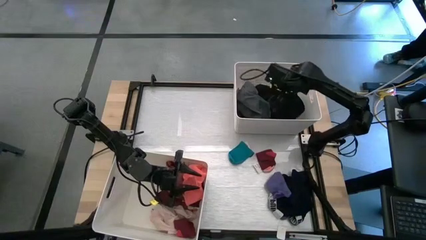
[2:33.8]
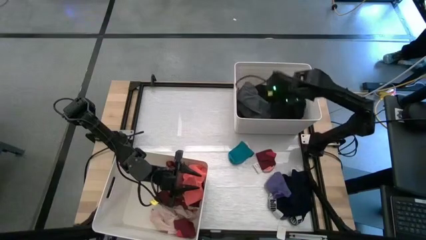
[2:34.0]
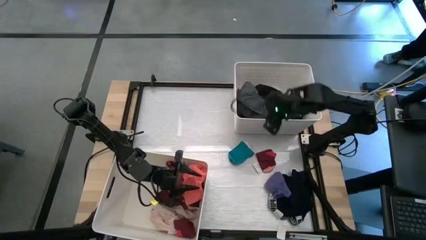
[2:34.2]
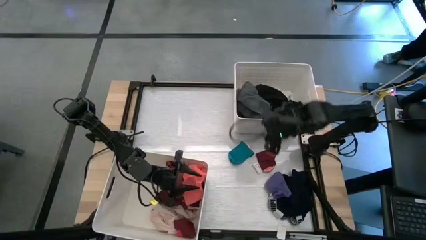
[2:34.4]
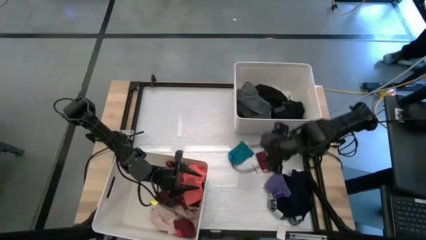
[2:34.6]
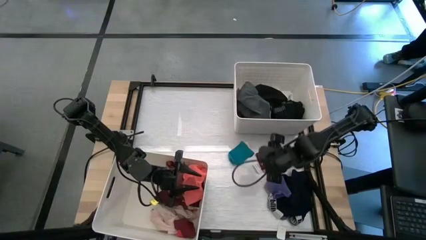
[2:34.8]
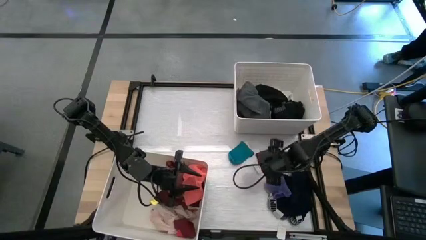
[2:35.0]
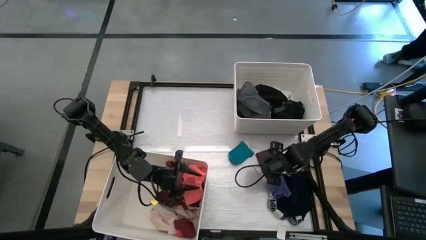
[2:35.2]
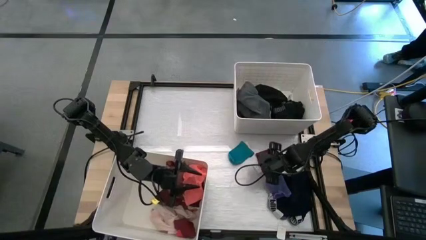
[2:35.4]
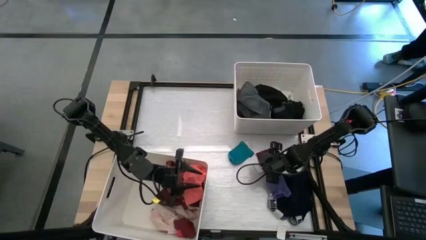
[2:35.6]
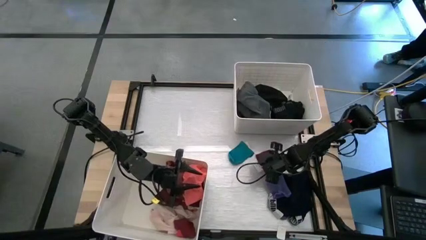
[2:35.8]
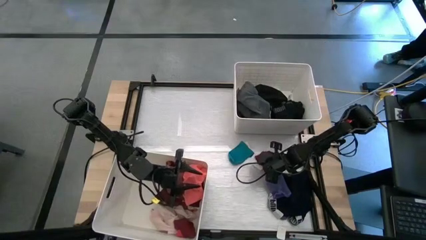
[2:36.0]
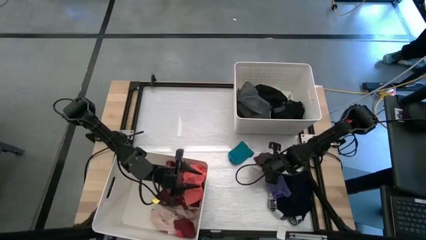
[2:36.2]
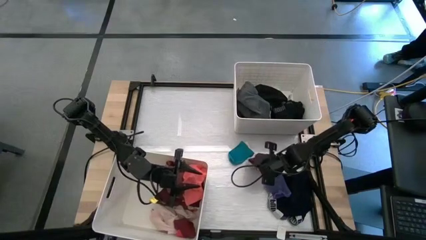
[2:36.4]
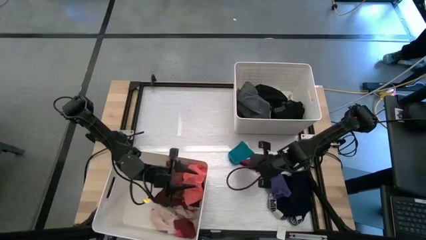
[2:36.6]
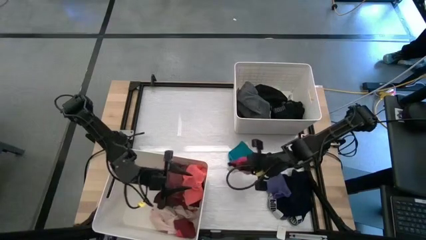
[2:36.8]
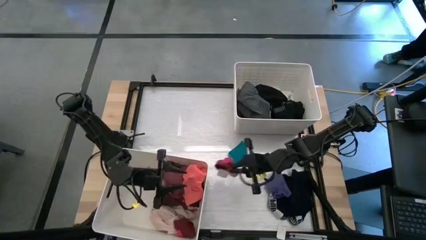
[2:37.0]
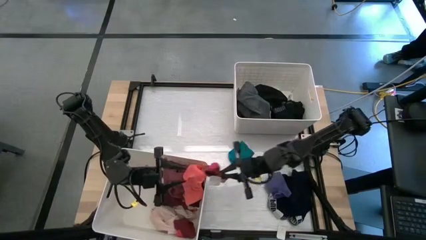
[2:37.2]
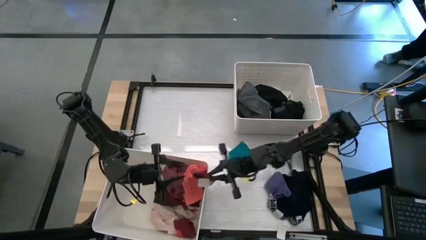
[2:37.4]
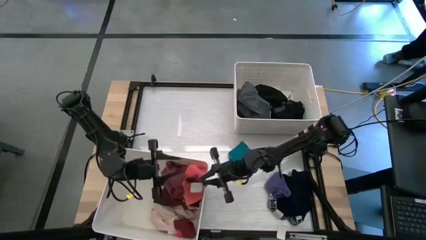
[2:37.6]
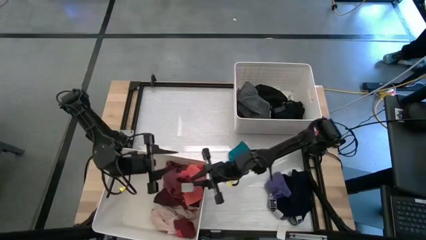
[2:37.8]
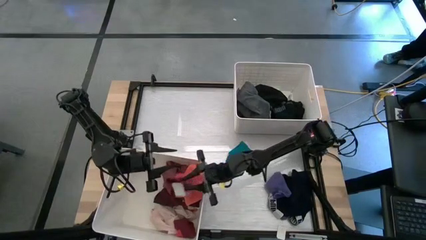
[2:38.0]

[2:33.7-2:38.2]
Task: Sort clothes
Put the red sock into the bottom white bin

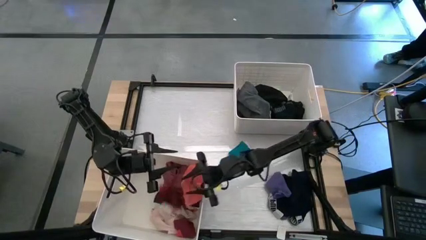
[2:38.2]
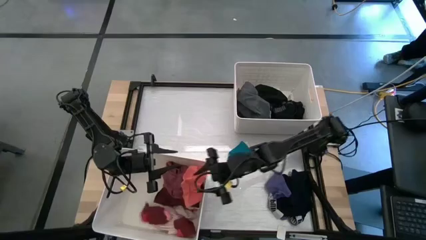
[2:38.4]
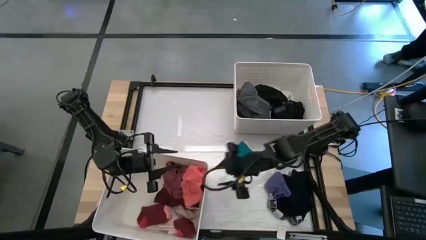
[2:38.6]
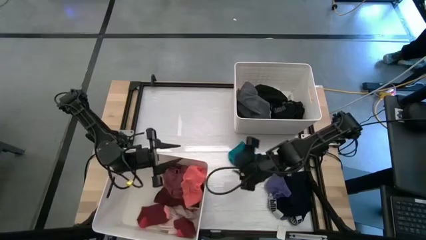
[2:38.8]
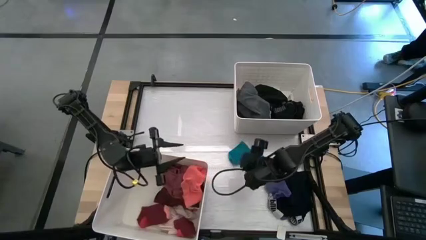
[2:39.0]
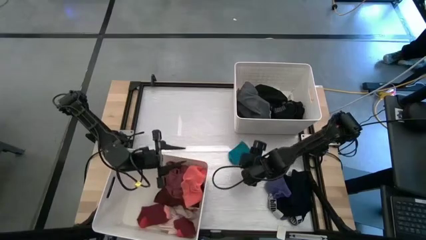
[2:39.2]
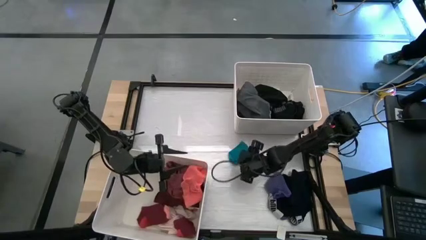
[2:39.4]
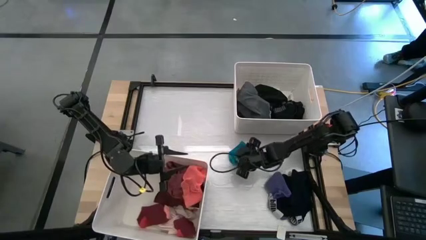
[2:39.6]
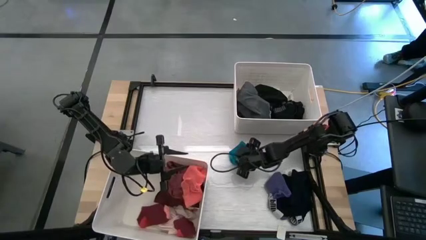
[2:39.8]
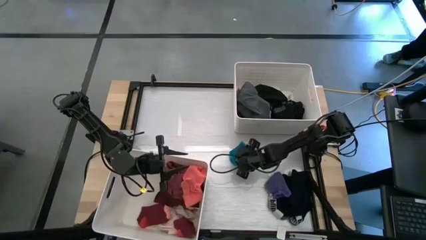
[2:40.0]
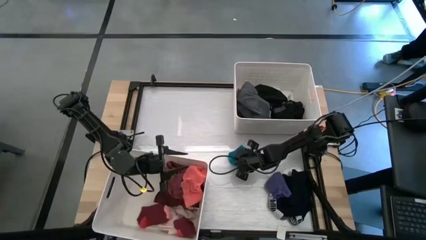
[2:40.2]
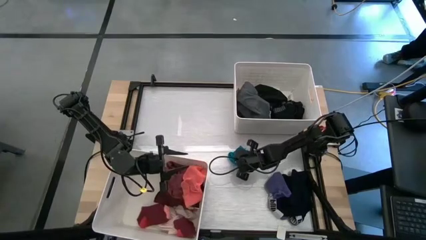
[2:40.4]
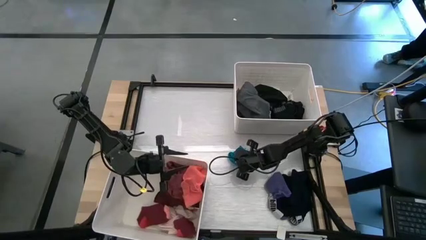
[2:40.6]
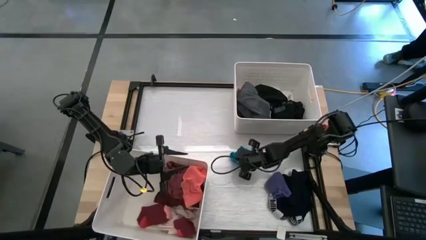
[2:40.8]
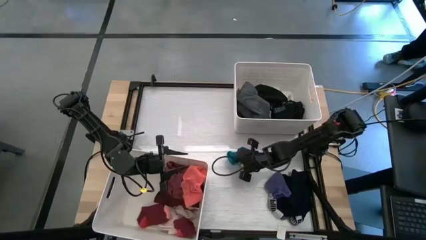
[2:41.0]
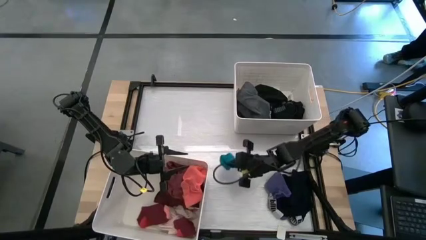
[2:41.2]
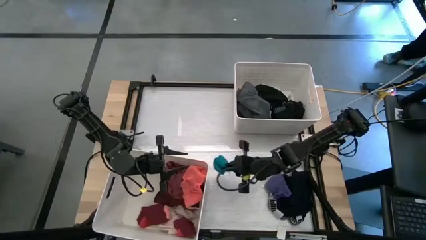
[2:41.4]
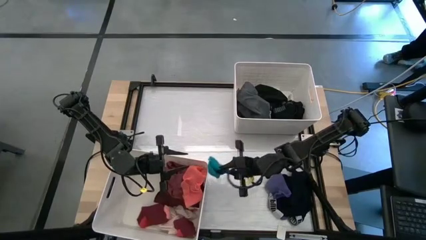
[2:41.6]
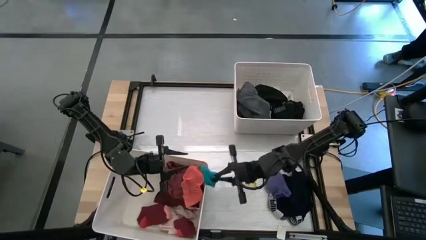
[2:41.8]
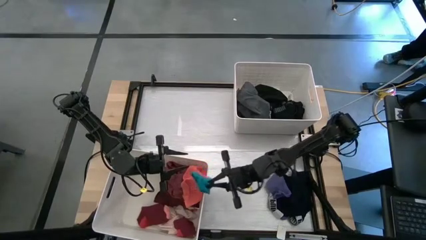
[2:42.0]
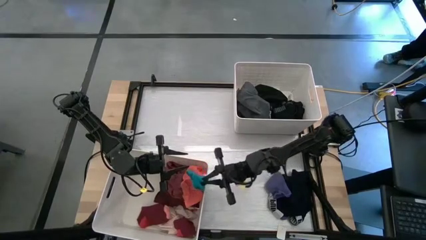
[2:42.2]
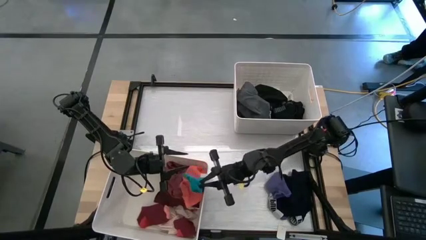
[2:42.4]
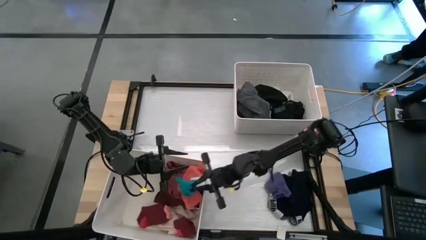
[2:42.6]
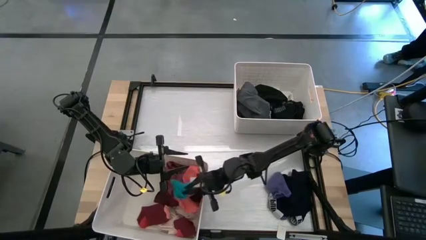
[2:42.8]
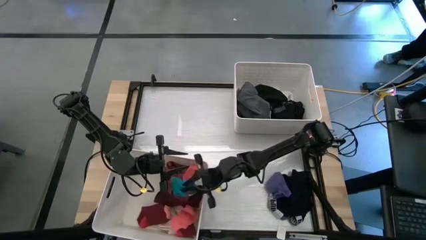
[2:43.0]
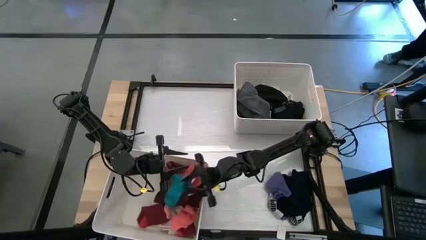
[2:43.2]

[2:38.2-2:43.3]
Put the blue sock into the bottom white bin

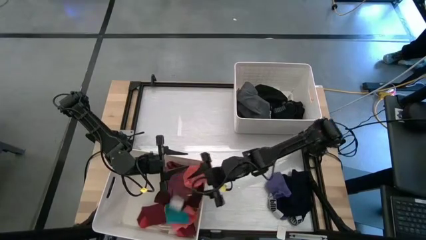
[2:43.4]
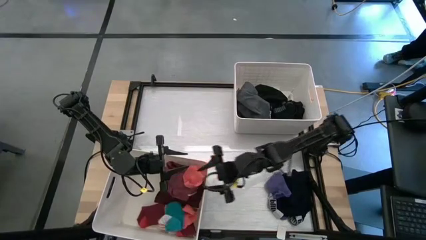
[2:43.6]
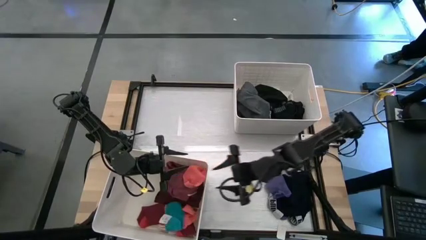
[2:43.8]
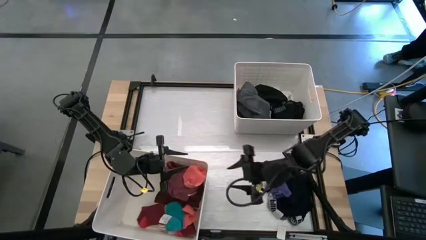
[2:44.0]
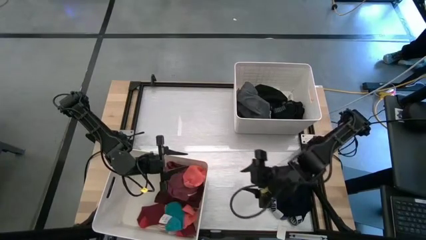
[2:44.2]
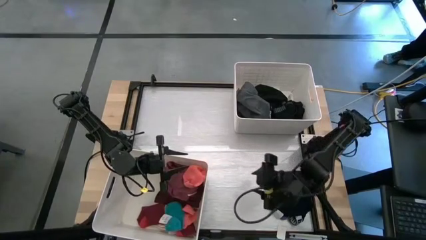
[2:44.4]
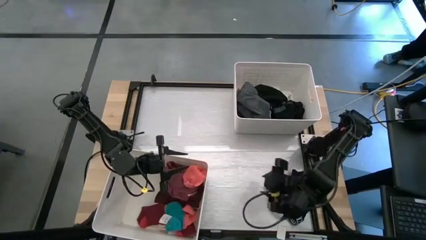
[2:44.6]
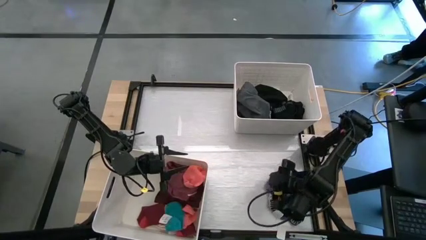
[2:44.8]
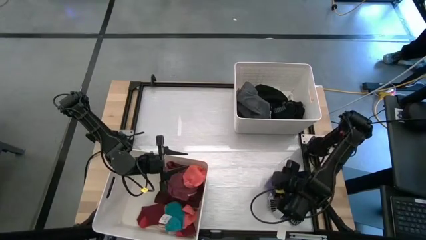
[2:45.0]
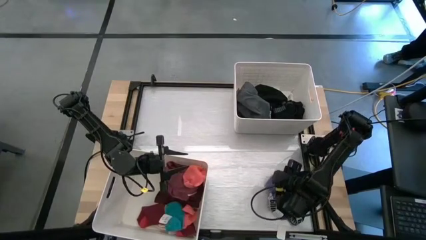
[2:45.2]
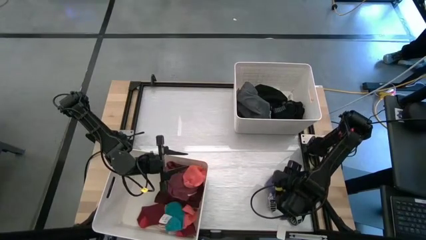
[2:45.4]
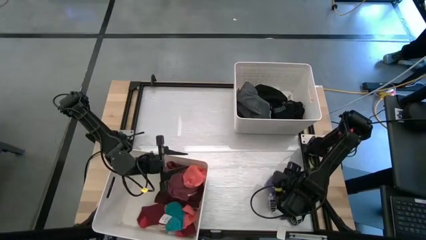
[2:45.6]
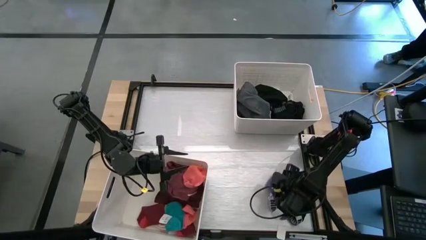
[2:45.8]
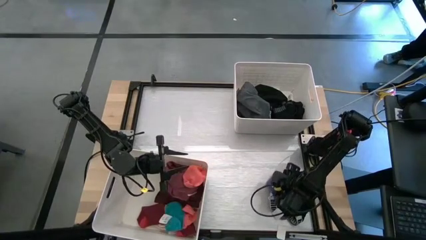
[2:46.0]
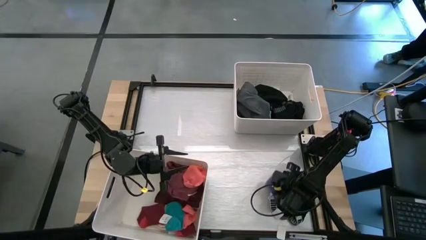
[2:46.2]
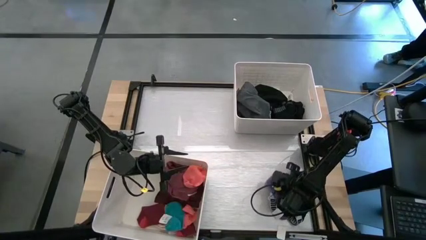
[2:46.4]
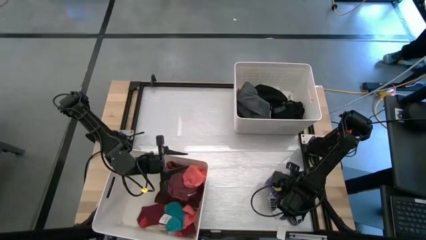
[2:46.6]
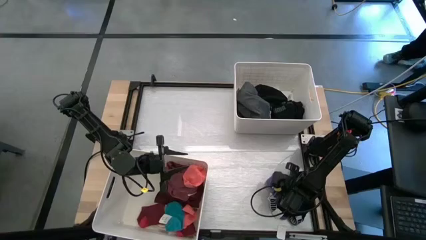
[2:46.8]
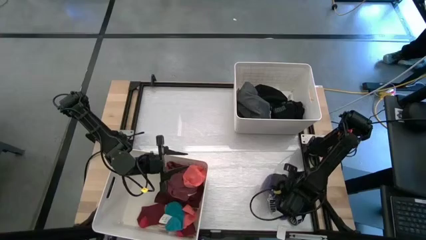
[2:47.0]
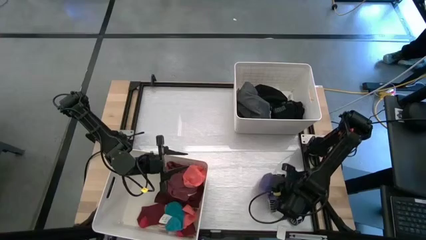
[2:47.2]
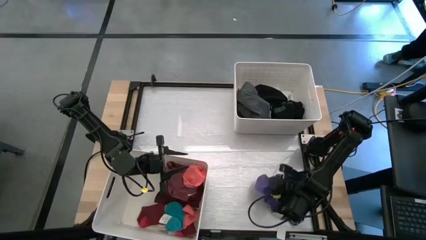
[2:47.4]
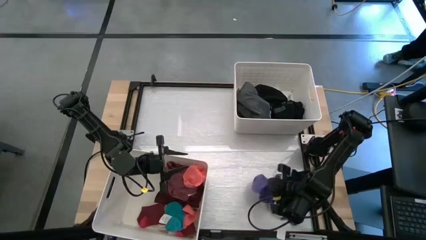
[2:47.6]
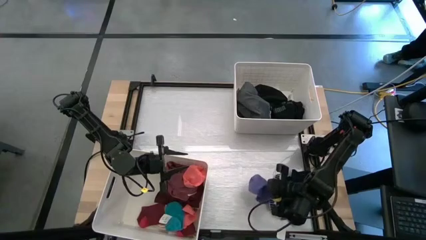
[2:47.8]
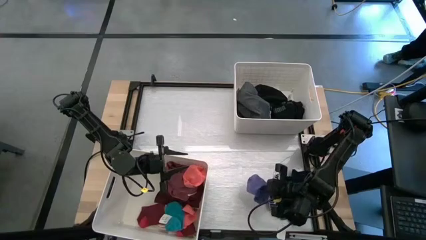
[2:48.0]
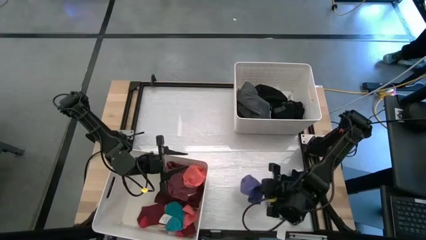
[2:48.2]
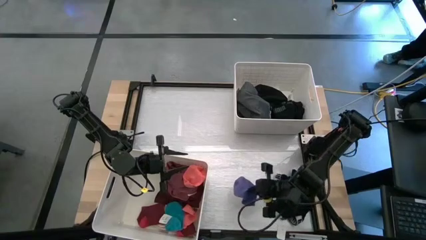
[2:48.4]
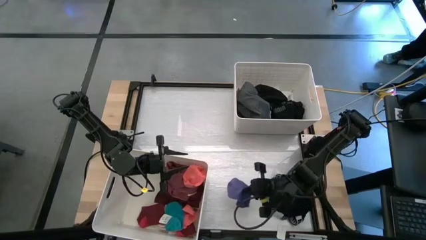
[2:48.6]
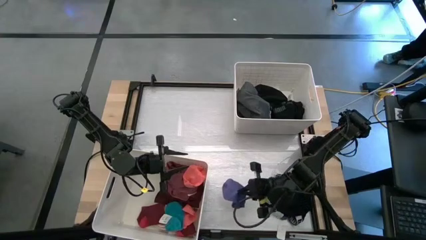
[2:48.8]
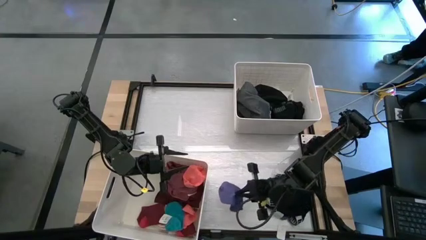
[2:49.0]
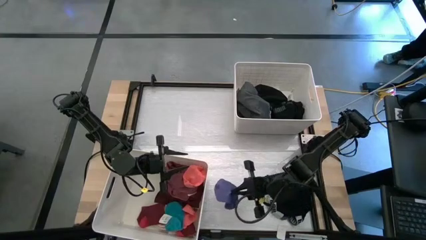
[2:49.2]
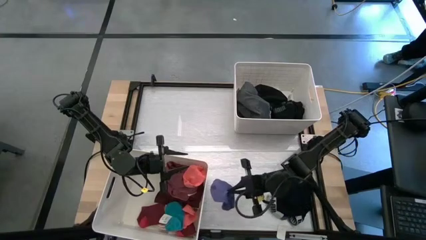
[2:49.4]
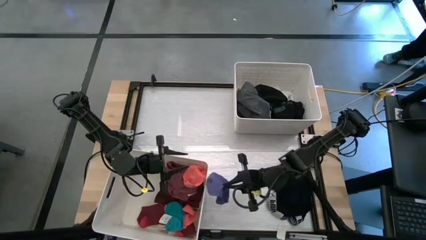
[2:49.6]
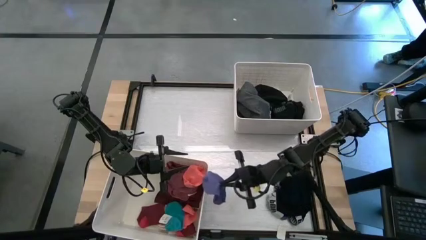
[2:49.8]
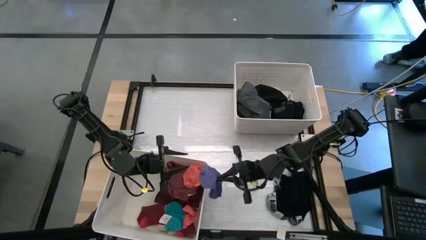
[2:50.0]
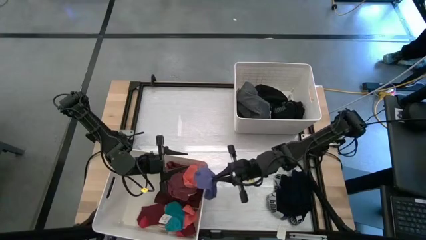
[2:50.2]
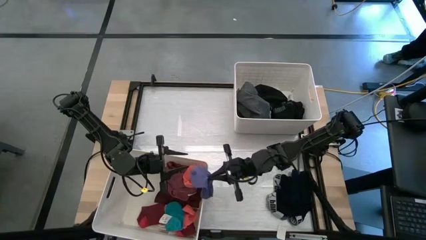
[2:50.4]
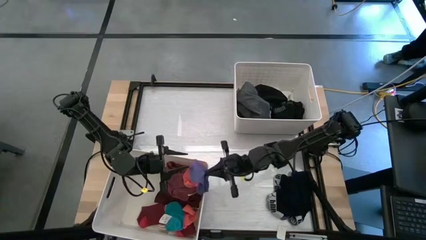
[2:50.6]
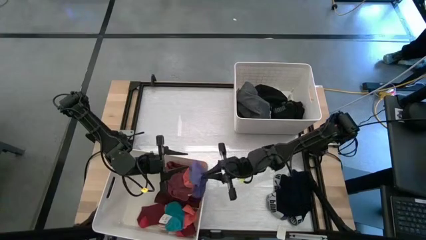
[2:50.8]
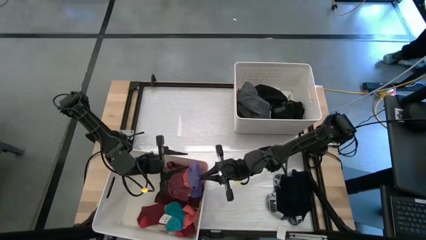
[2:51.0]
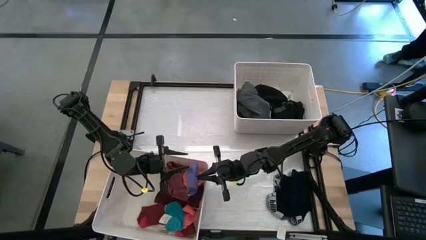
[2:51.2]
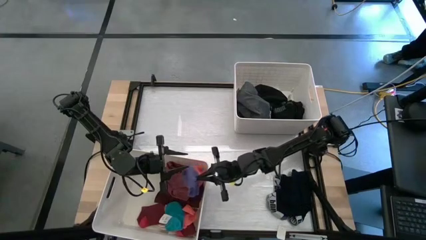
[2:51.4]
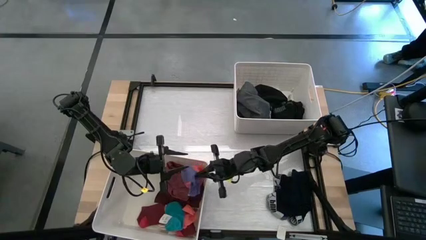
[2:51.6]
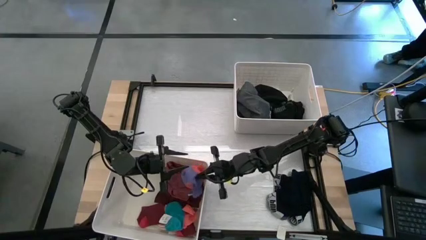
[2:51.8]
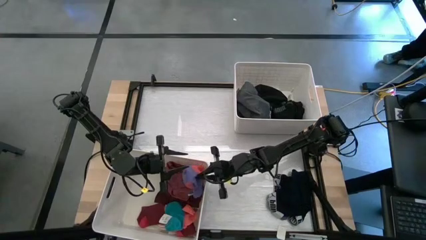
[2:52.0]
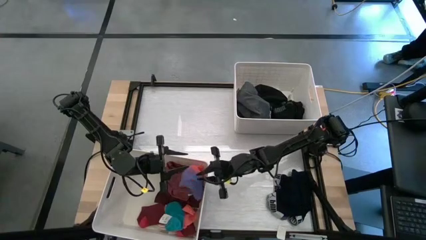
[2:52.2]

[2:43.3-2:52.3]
Put the purple sock into the bottom white bin
